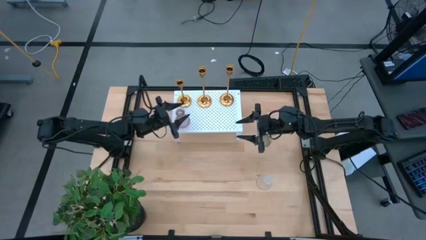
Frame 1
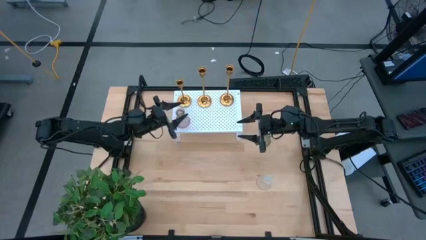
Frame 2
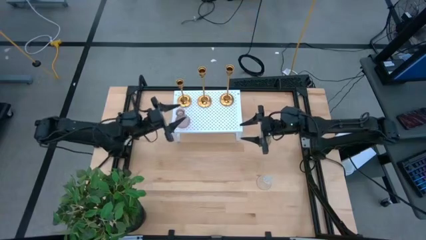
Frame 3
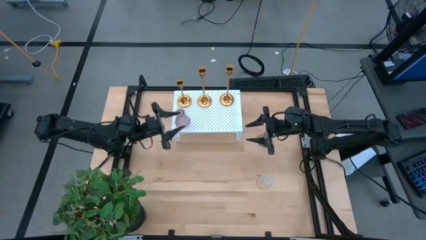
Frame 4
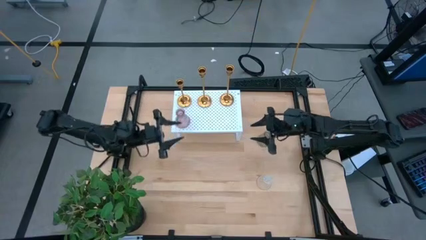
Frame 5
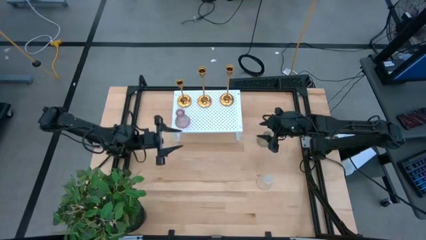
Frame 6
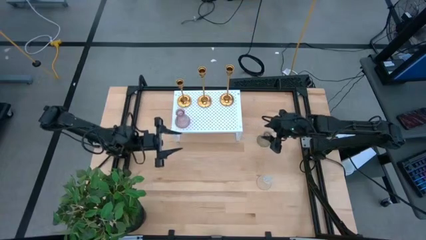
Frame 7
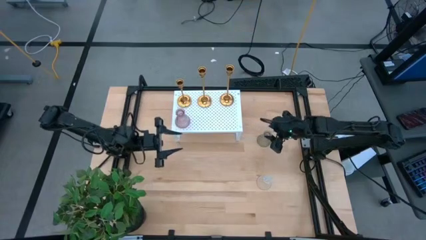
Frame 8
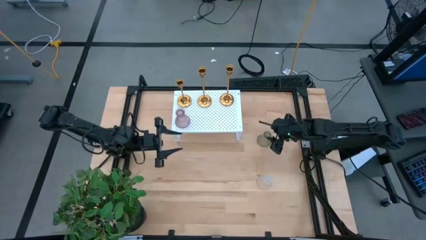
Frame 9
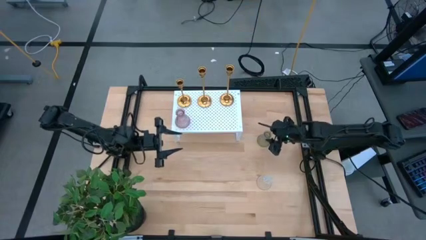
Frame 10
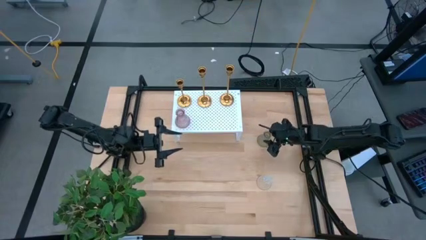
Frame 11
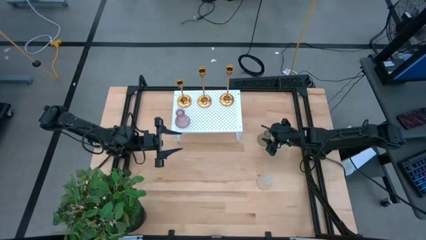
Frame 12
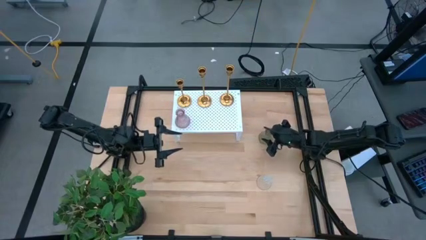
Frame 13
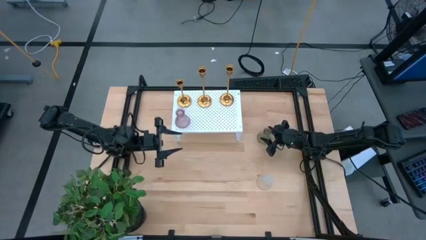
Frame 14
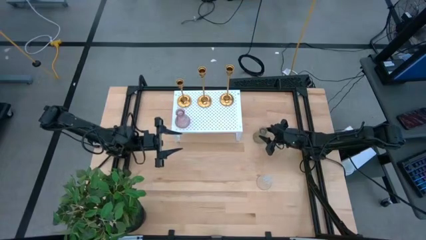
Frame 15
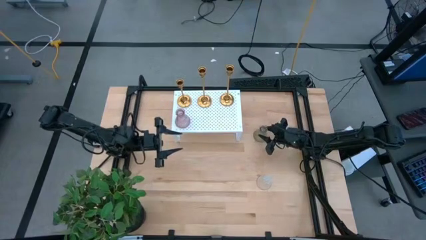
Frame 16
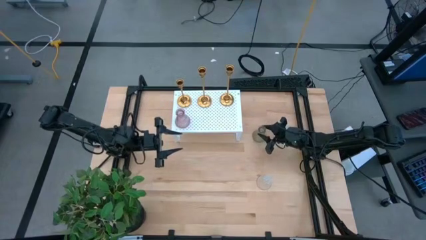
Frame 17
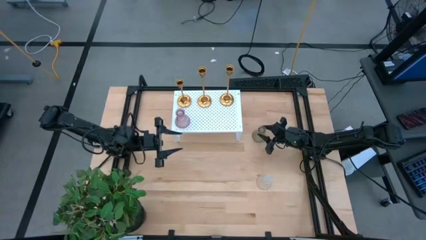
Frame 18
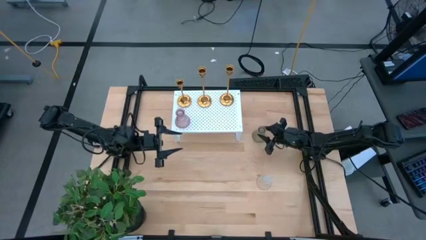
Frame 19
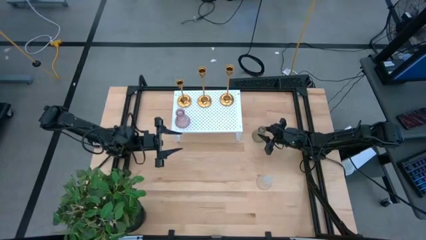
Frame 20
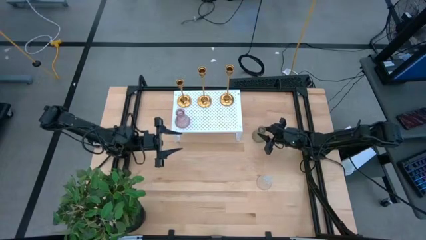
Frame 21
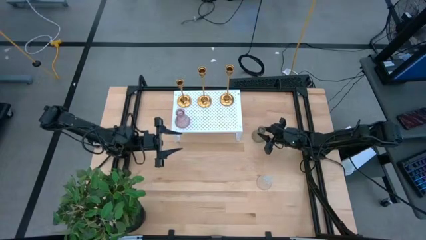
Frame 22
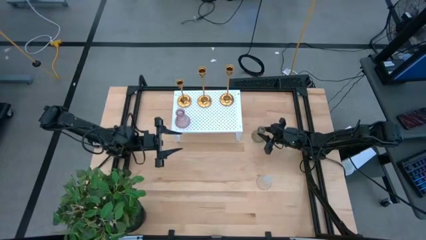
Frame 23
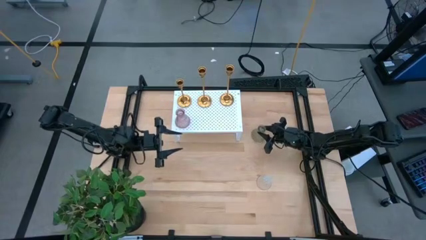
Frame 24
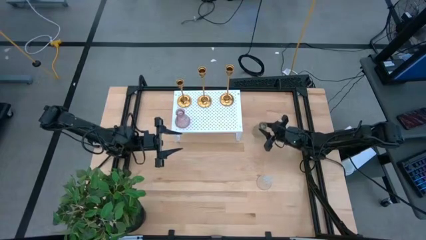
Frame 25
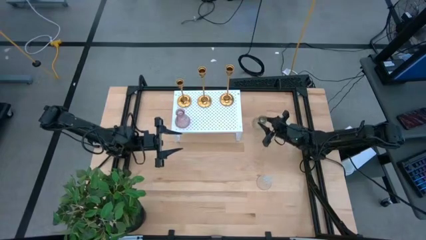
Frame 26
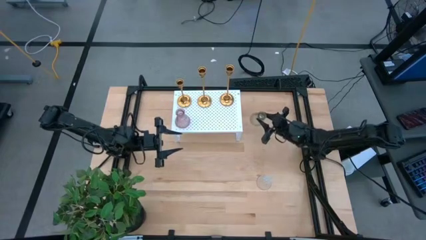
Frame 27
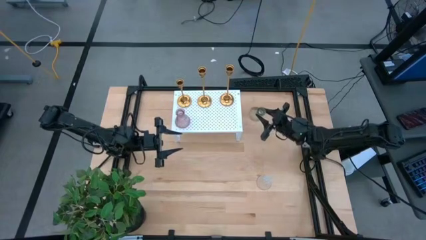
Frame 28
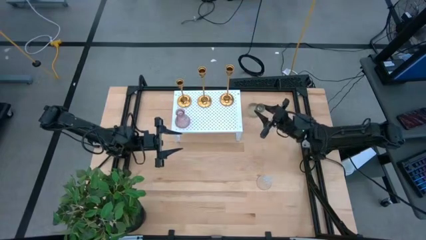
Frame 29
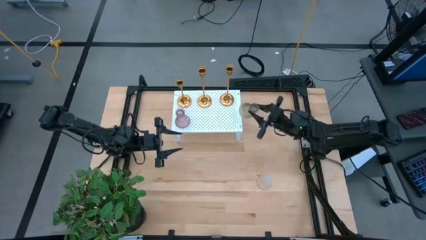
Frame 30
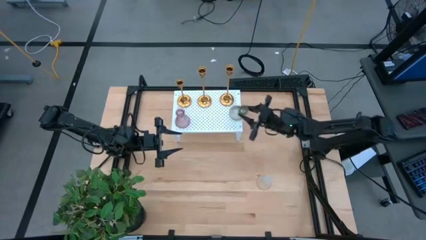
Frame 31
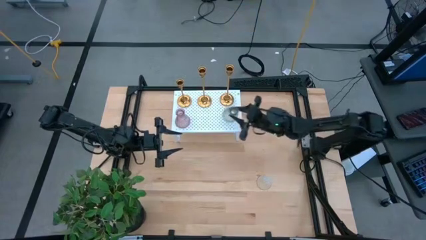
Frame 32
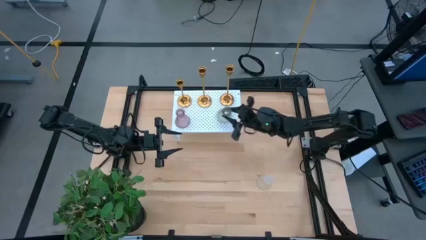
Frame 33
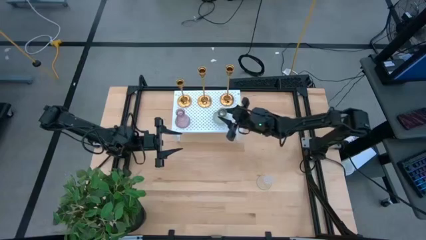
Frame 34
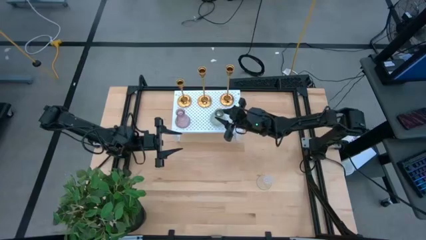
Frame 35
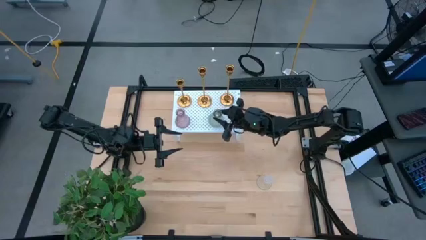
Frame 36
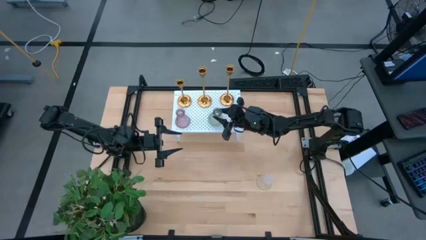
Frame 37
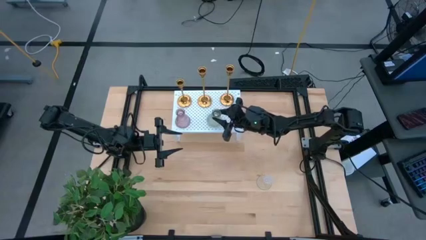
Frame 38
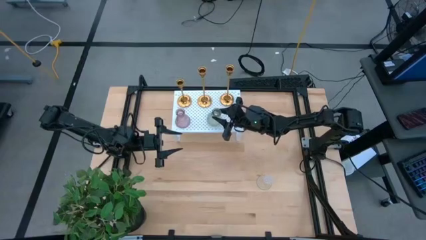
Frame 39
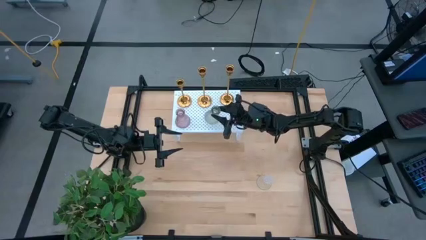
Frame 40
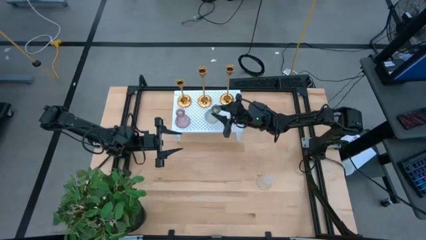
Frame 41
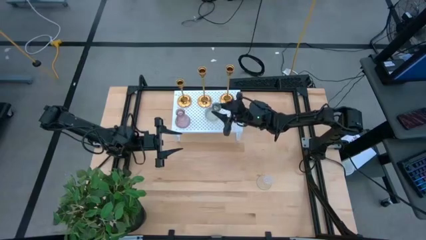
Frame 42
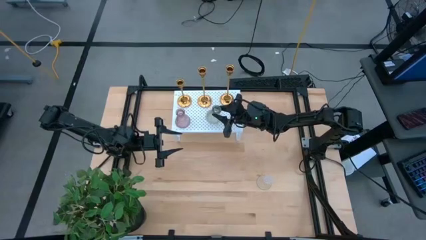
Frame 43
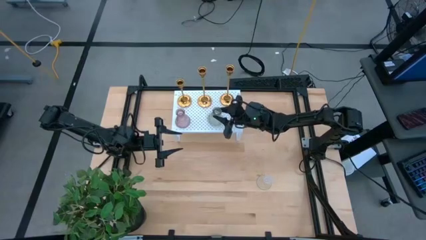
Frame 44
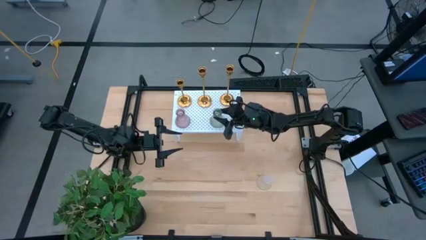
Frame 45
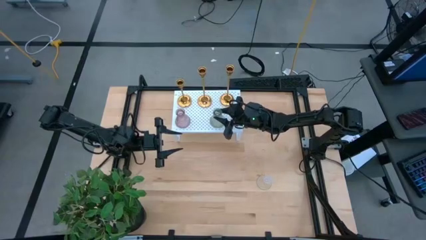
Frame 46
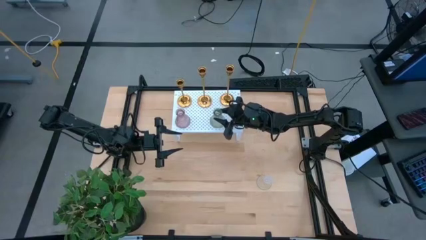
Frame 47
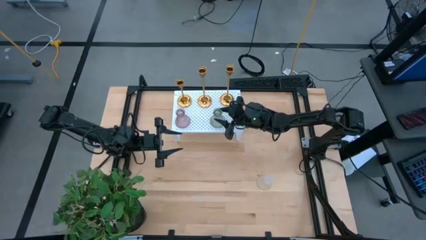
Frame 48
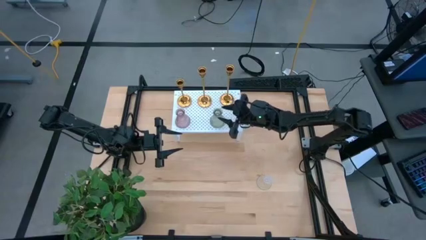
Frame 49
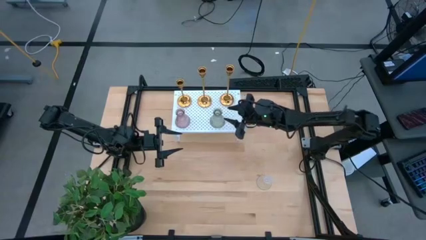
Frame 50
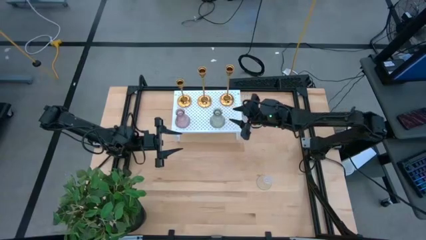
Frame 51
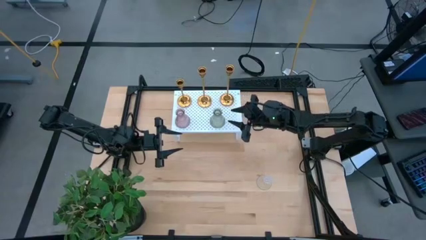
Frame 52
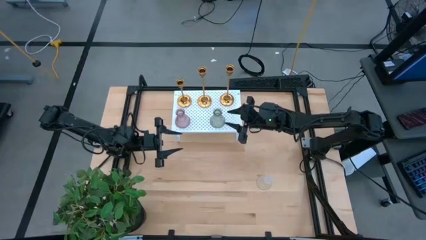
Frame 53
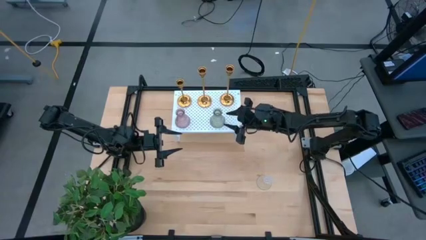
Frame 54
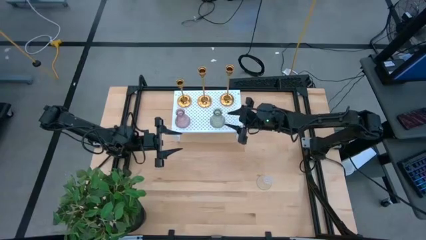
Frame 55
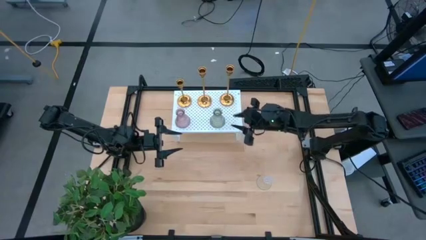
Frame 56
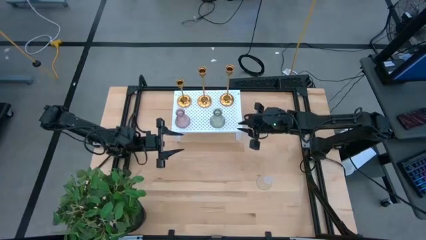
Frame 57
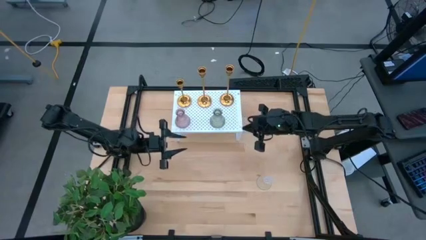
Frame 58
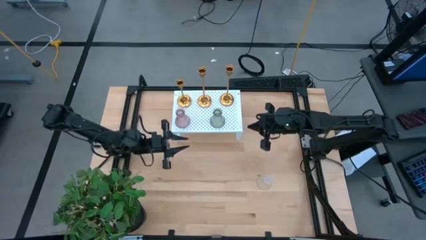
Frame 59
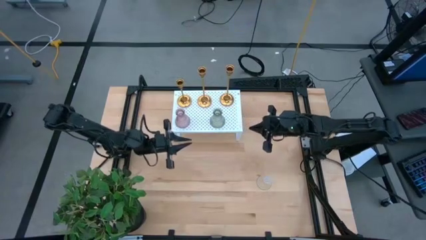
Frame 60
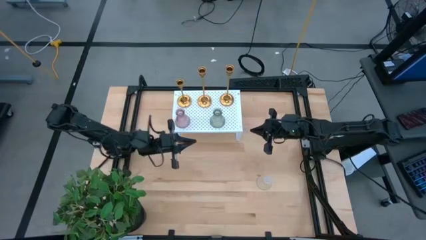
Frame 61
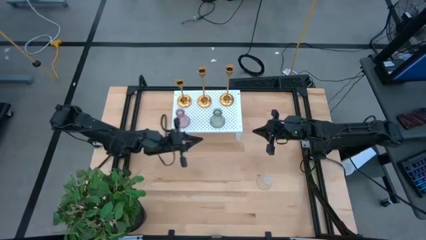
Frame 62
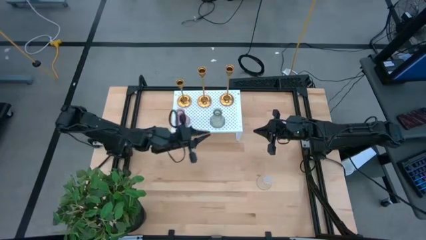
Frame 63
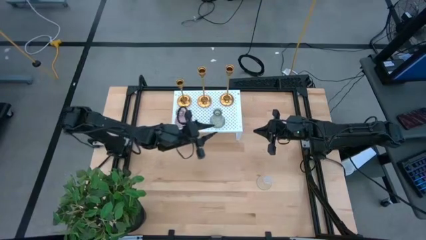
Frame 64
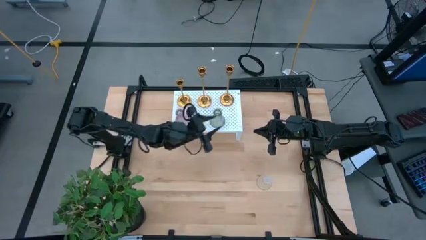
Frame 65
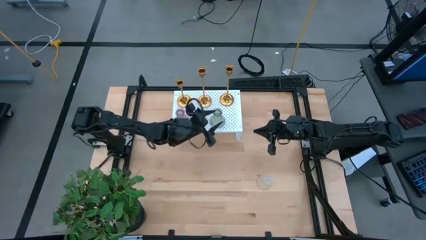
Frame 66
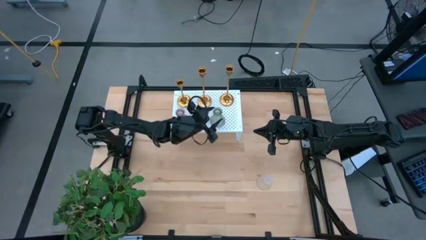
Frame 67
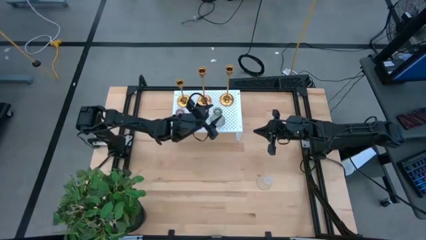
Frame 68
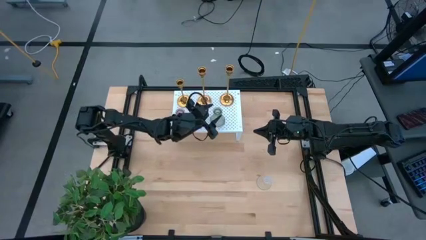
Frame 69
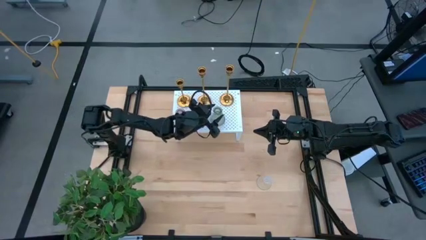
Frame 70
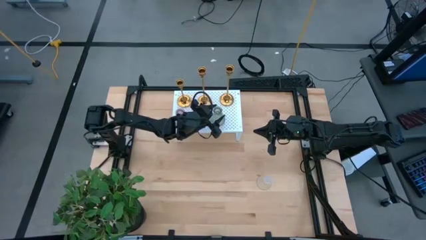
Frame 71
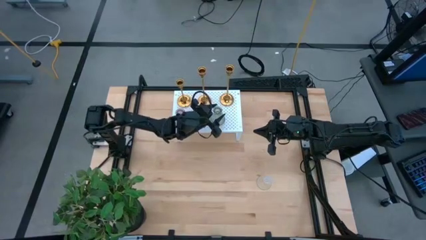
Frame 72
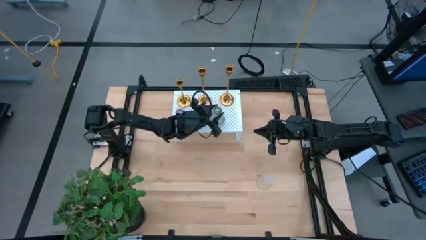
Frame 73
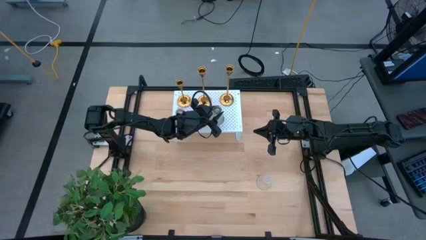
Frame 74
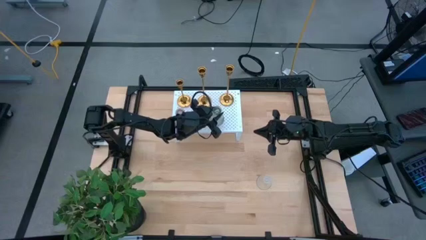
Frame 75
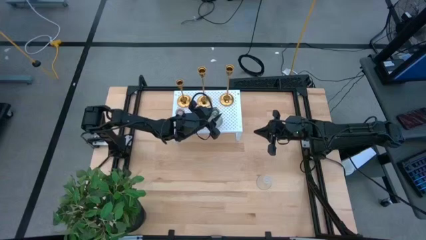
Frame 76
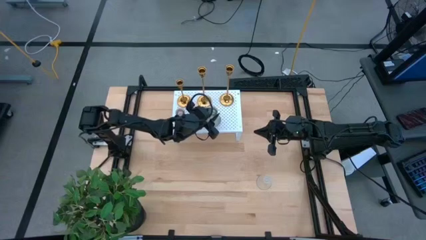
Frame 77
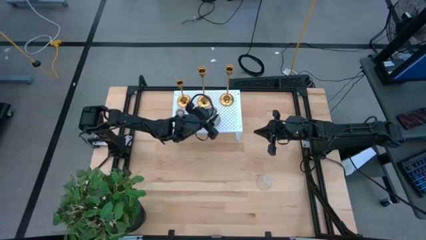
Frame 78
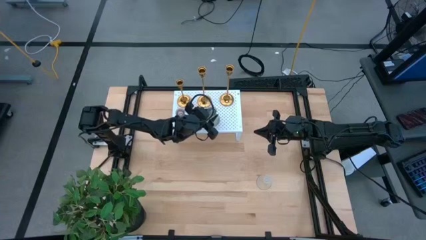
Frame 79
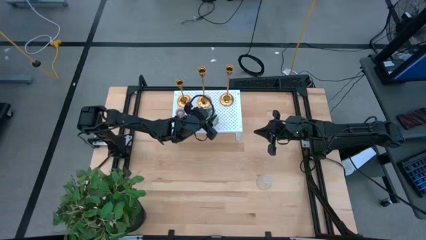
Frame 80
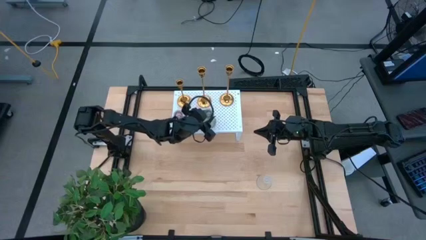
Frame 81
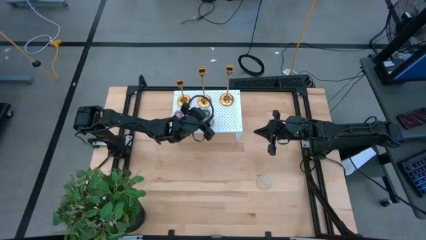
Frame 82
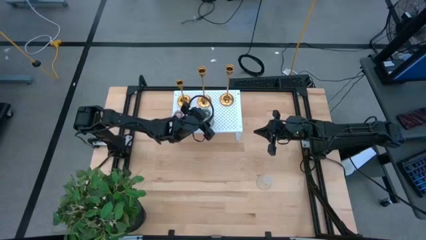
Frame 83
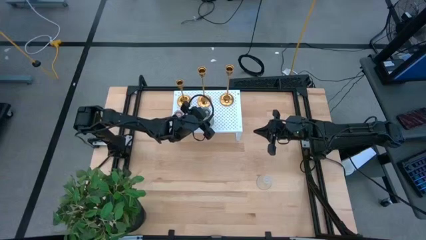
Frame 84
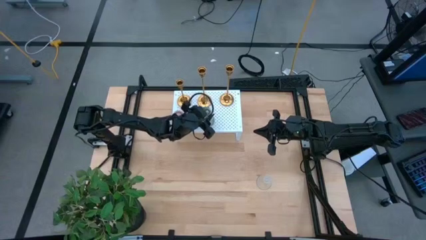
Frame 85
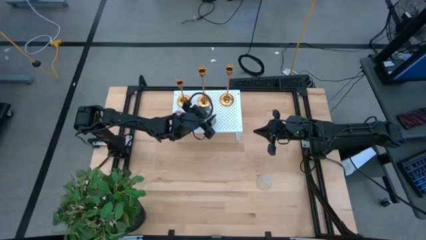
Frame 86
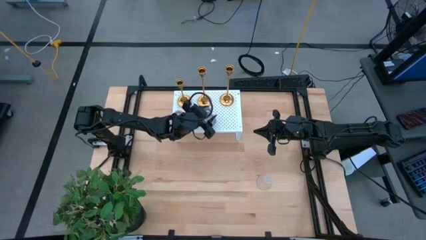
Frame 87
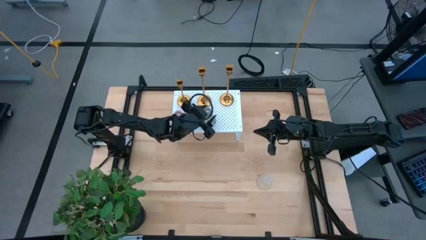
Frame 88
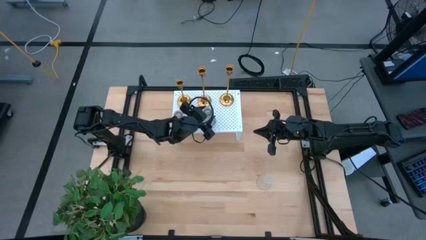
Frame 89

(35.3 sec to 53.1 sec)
Task: Pick & Place candle stick holders
Put the green glass candle holder on the shelf aligned with the other glass candle holder
